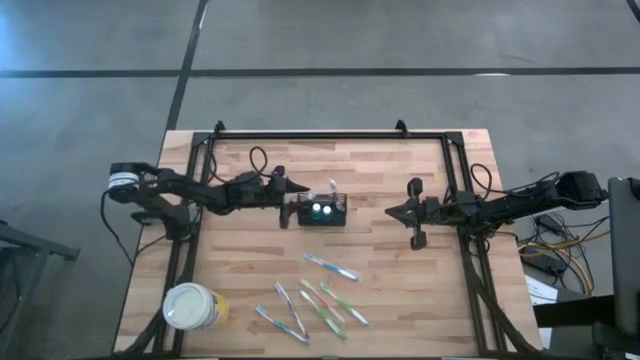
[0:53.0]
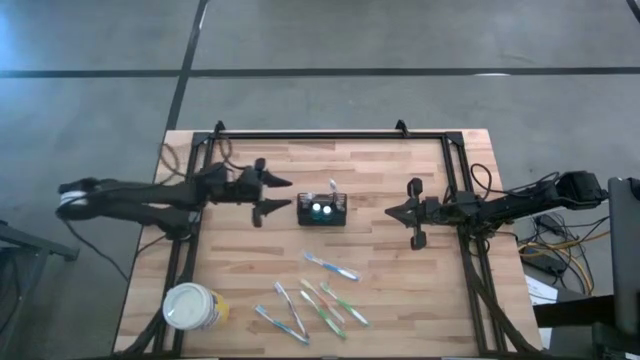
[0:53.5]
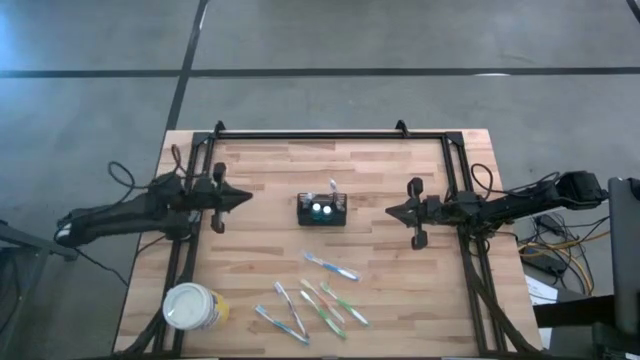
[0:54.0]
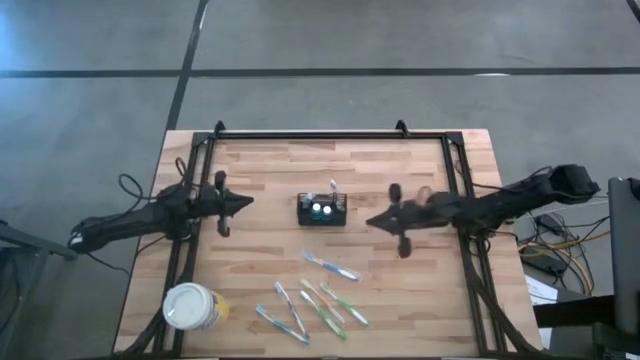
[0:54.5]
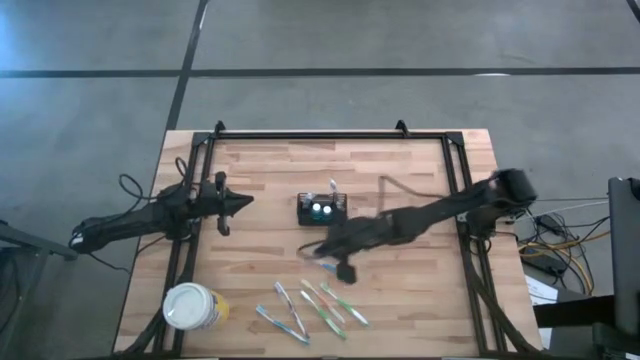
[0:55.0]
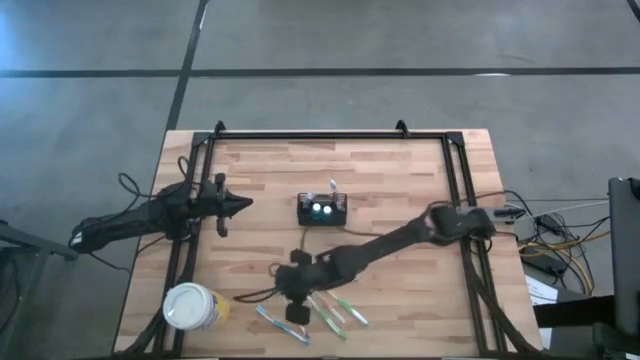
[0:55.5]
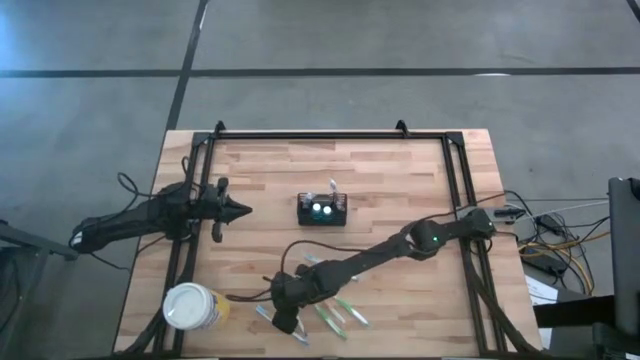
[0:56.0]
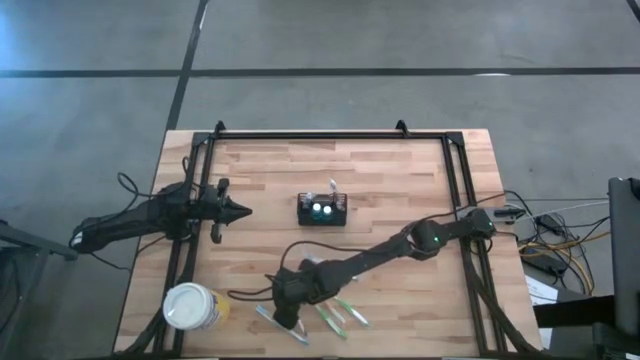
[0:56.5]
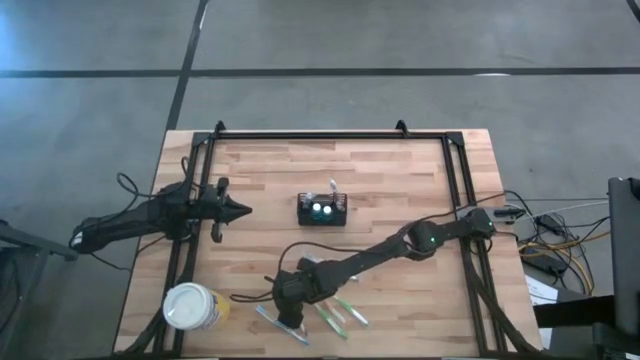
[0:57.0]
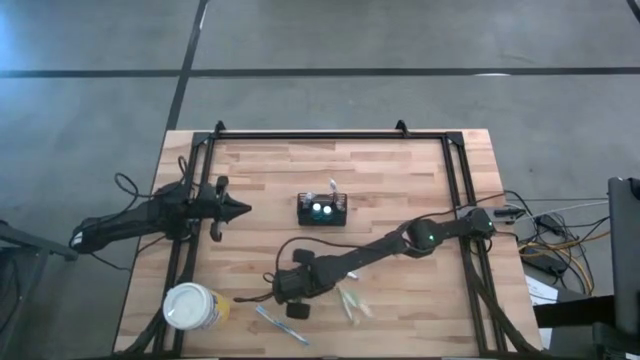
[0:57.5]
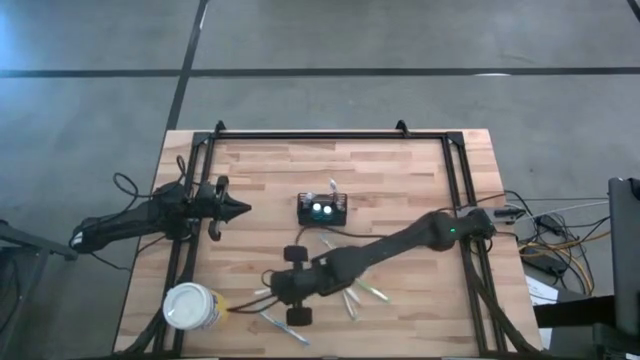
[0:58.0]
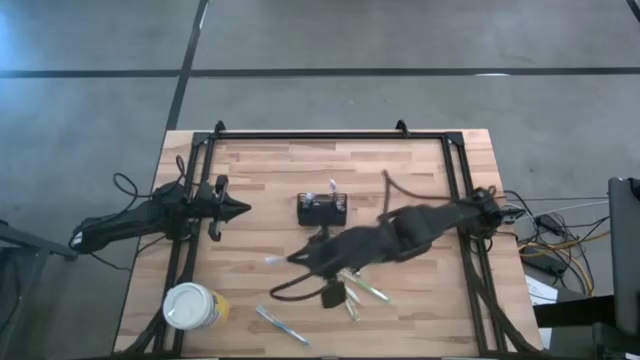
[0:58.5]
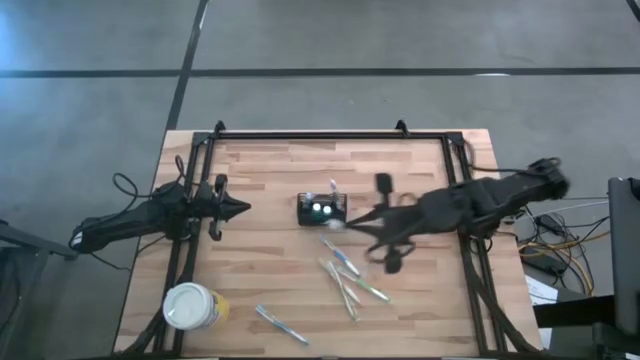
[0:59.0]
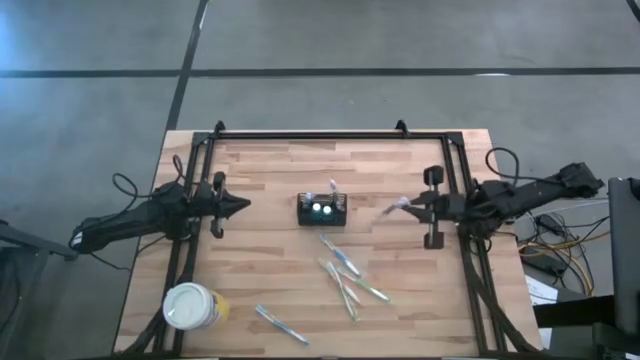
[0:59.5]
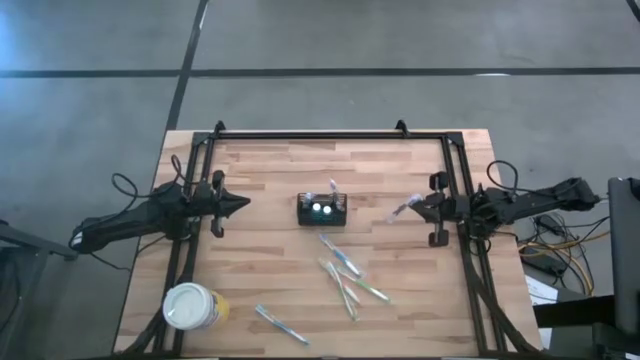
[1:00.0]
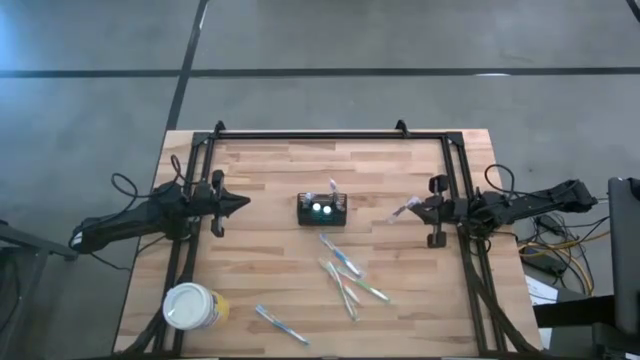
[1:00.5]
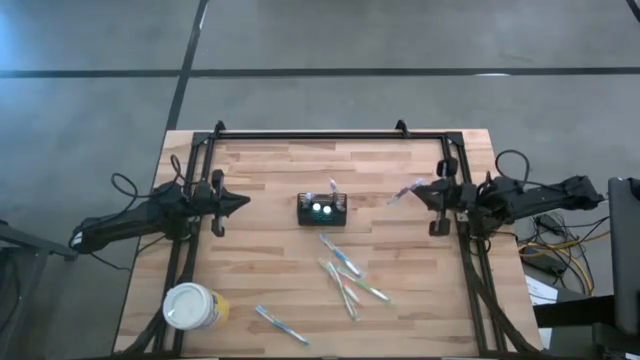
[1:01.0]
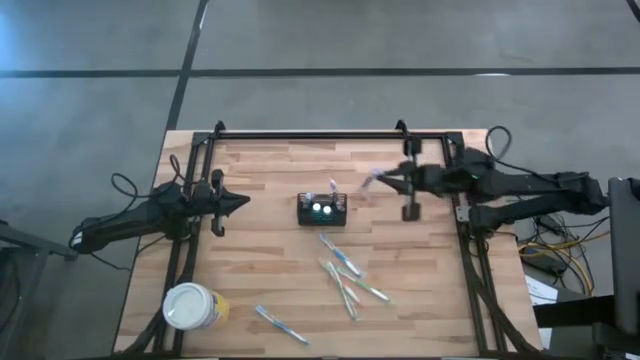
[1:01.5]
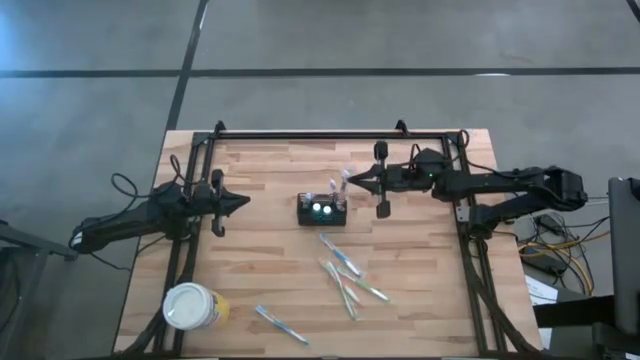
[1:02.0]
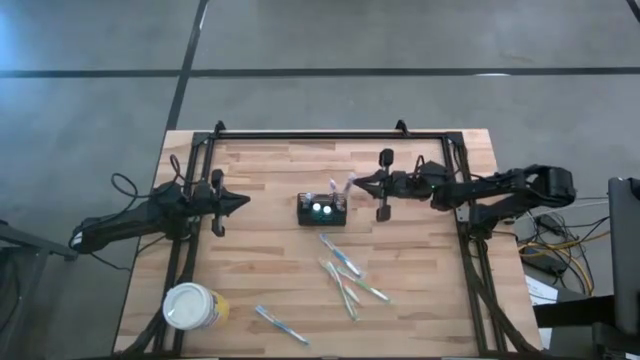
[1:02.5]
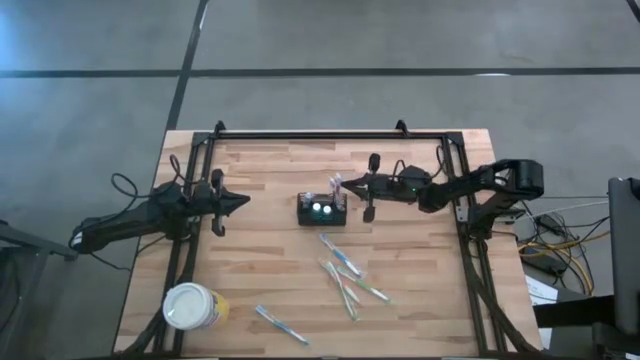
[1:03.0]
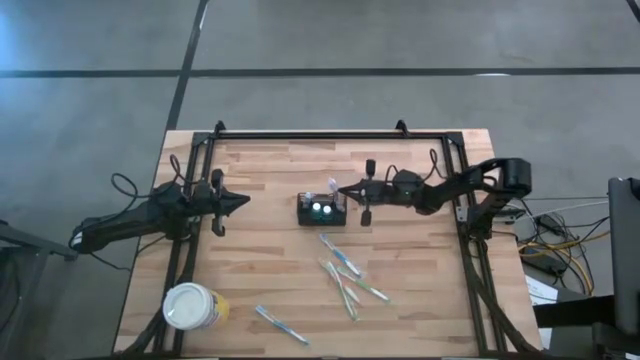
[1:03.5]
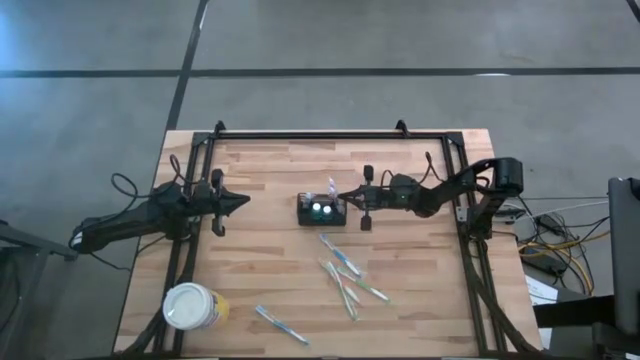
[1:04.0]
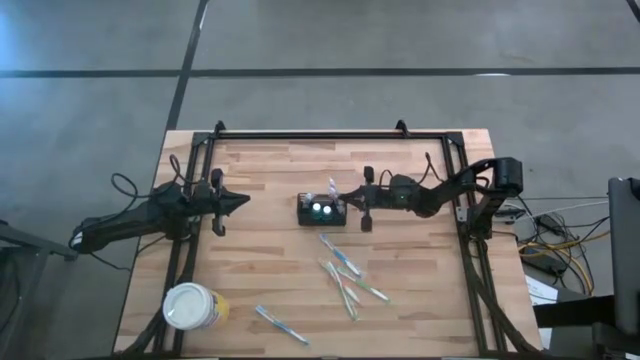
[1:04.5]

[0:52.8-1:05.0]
Task: Pick & Place toothbrushing station
Put the violet toothbrush into the black wire organizer

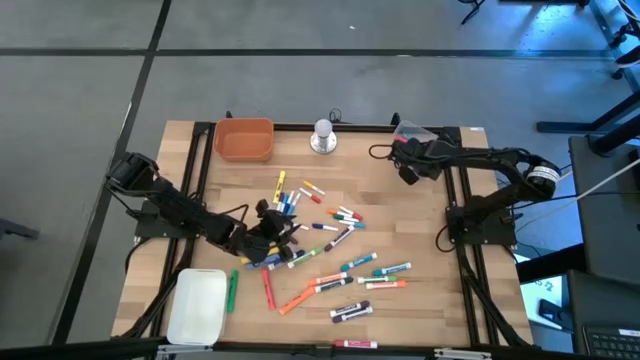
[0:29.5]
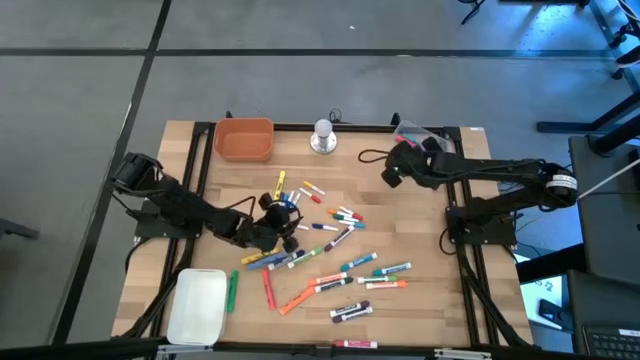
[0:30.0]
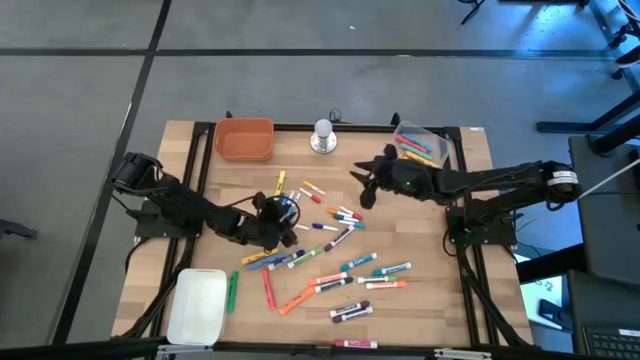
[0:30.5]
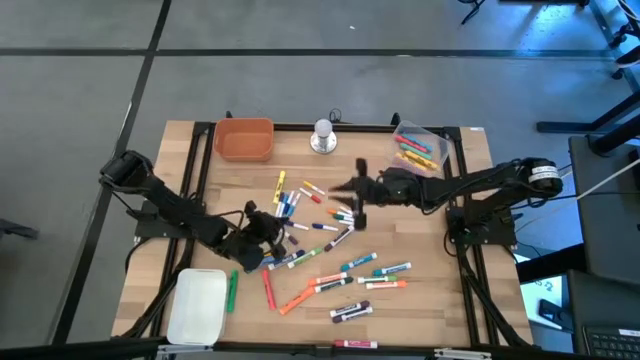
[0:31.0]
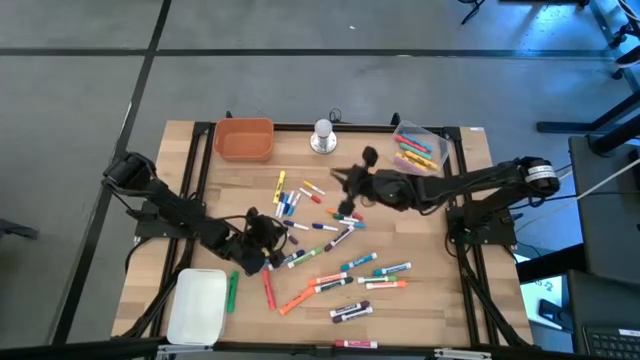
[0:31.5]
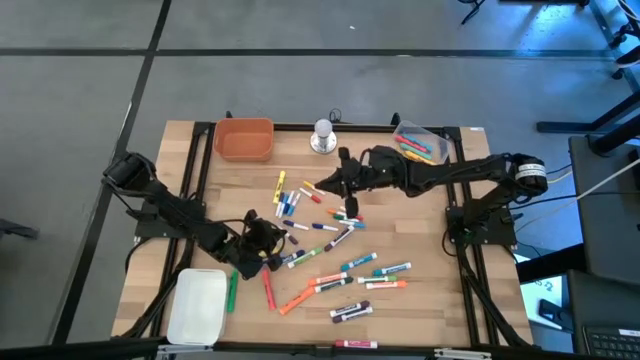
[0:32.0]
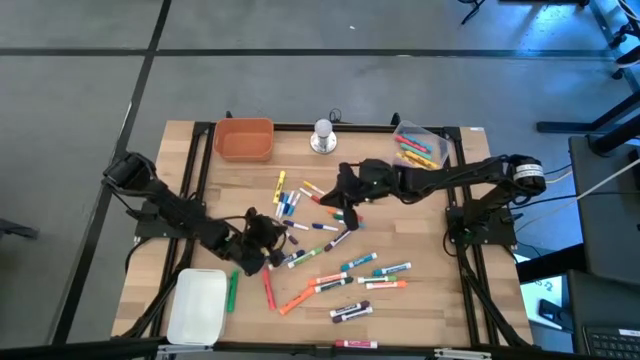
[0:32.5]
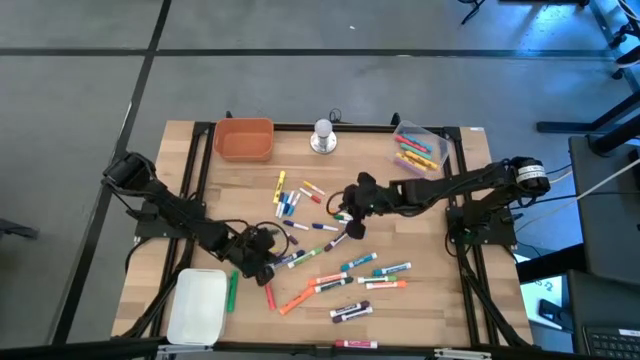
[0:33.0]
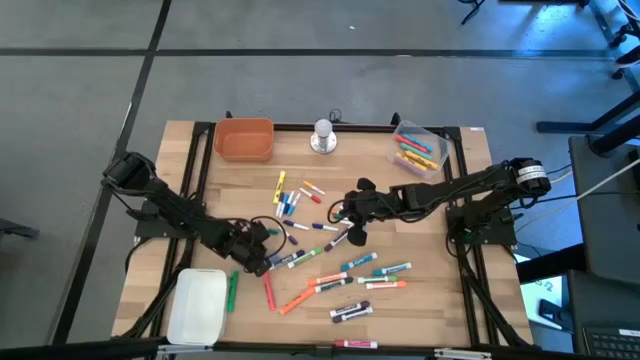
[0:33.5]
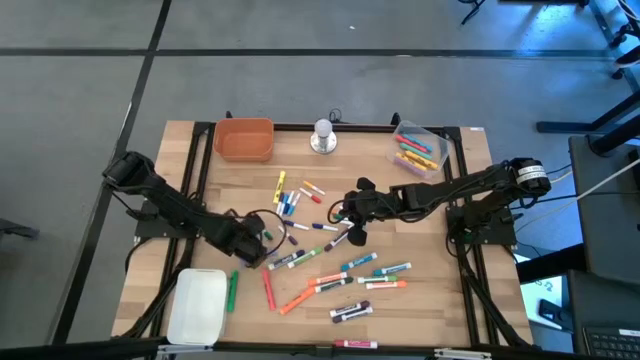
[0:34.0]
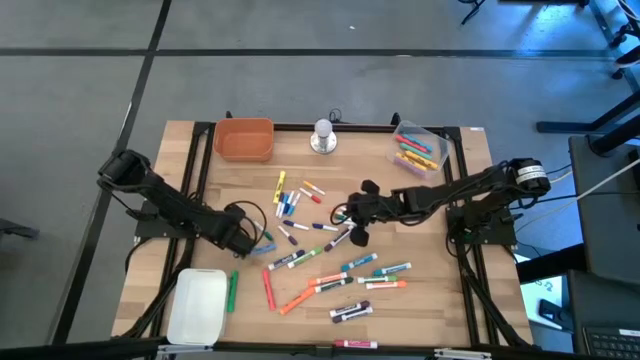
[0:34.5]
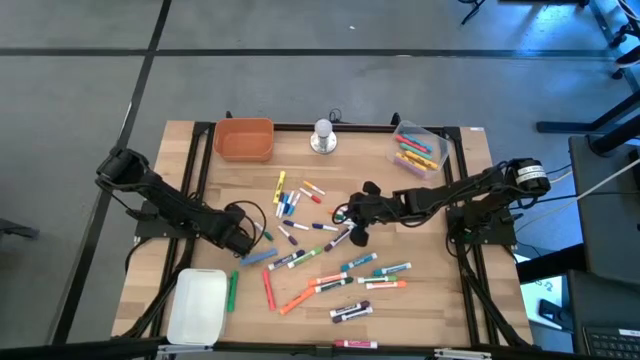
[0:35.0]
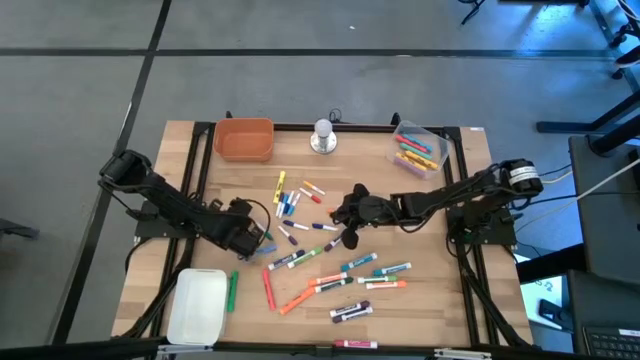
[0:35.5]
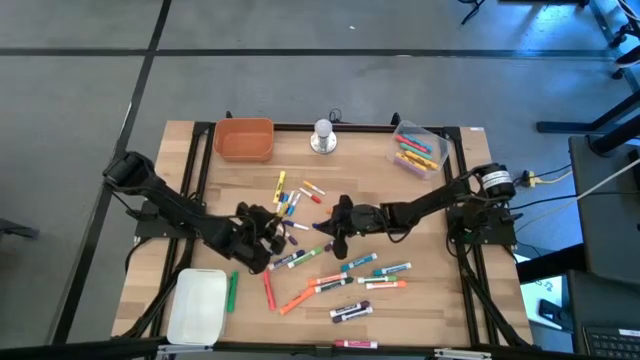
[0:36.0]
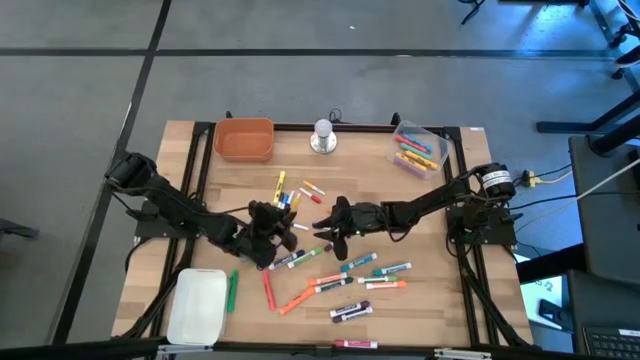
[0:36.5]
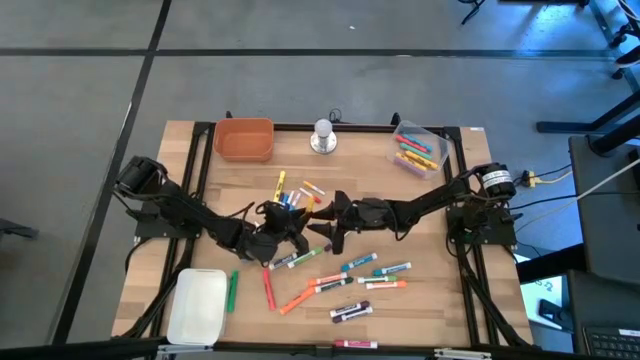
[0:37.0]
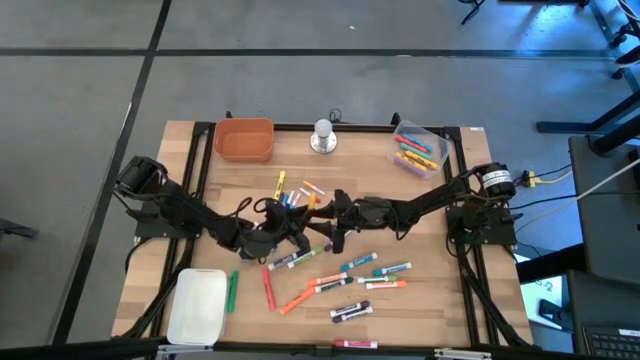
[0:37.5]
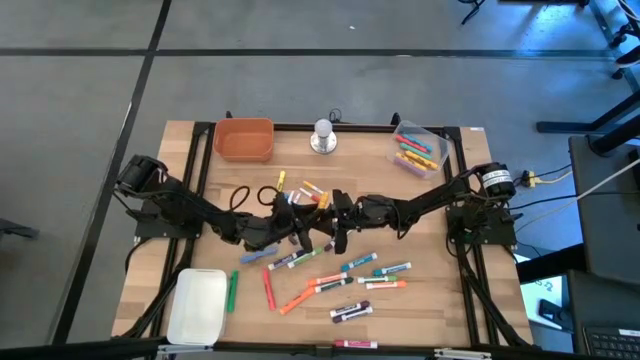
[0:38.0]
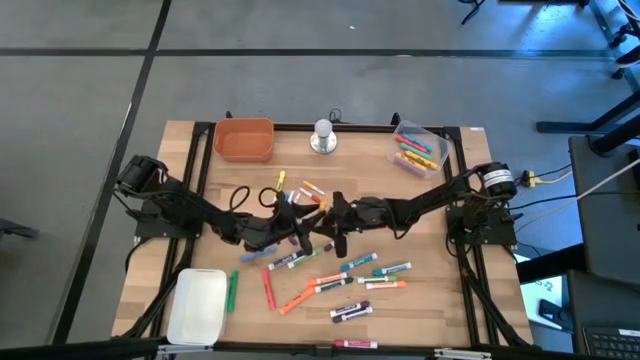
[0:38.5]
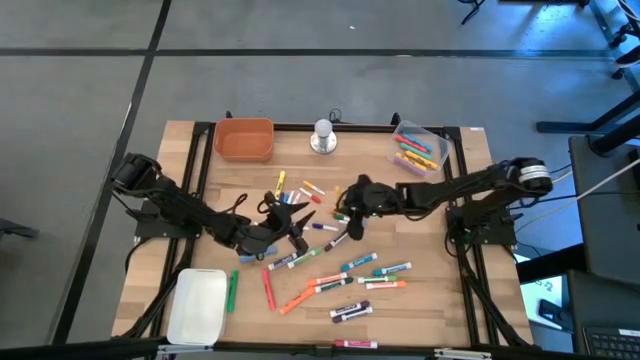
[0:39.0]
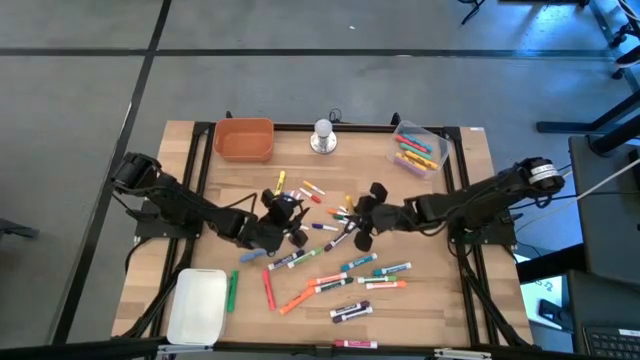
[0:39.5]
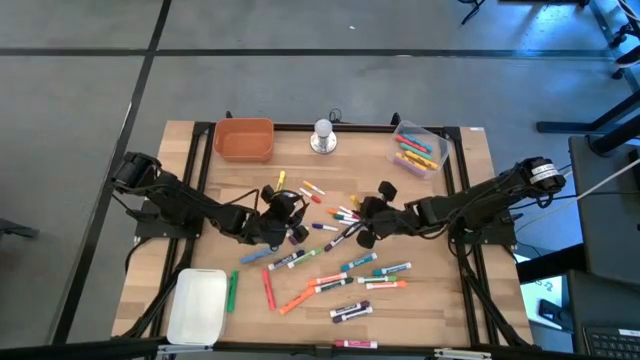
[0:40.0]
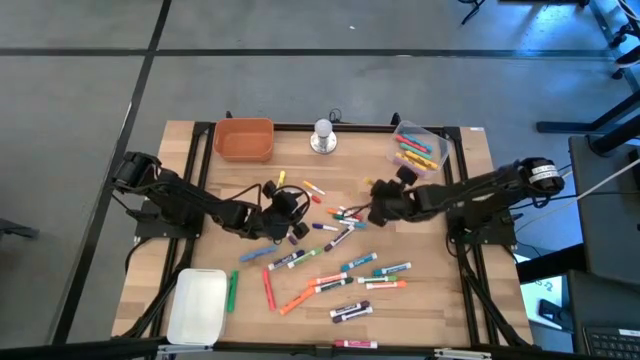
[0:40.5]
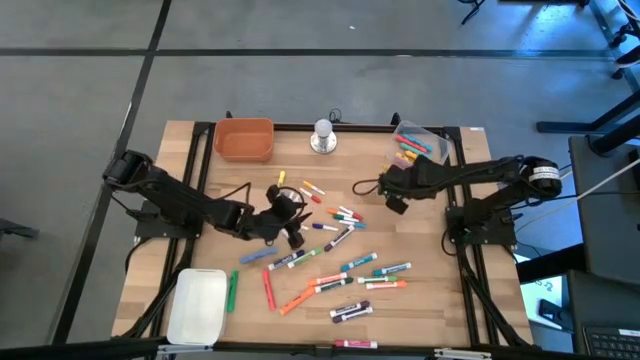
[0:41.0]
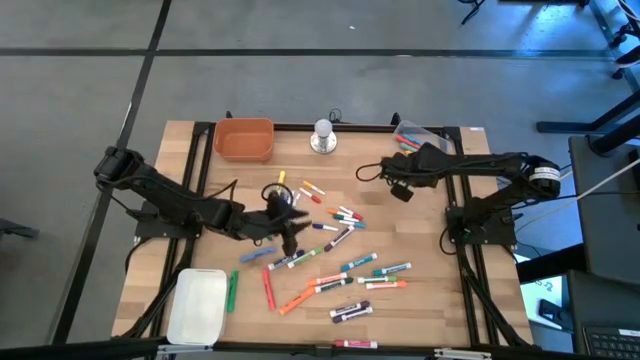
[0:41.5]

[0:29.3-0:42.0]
Task: Pick & Place Markers
Put the large yellow highlighter pen into the transparent bin
